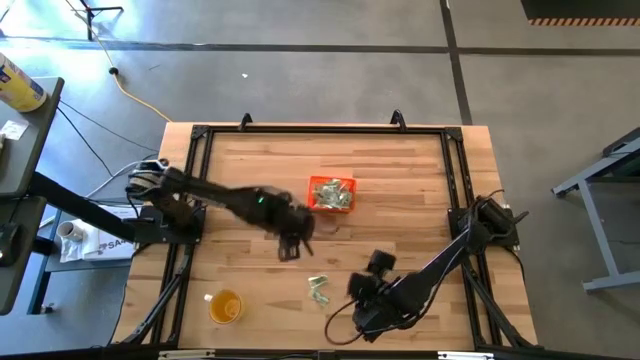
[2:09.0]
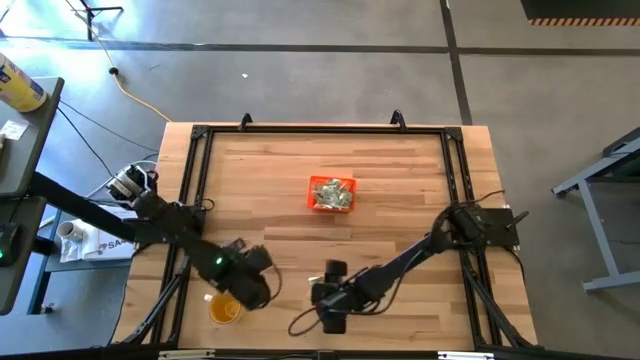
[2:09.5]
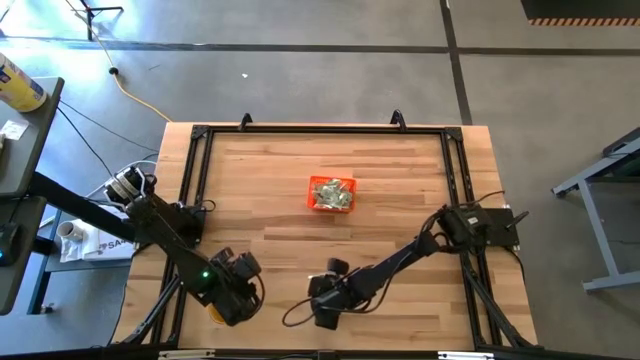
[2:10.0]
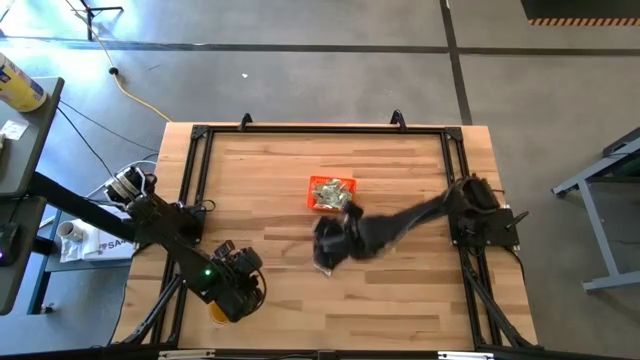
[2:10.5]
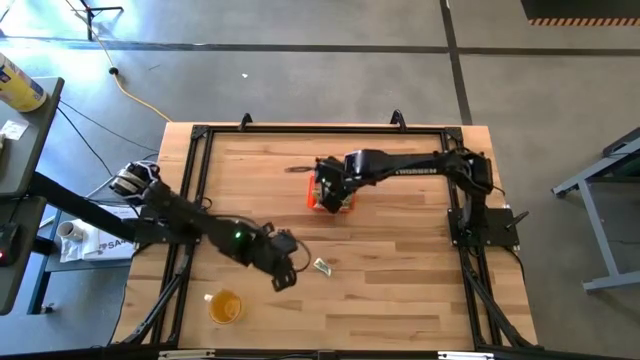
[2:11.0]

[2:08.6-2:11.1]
Task: Pick and place Stevia / Truvia into bins
Put the bottom stevia packet into the basket

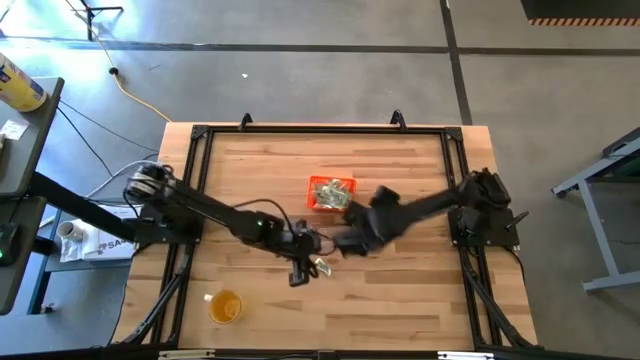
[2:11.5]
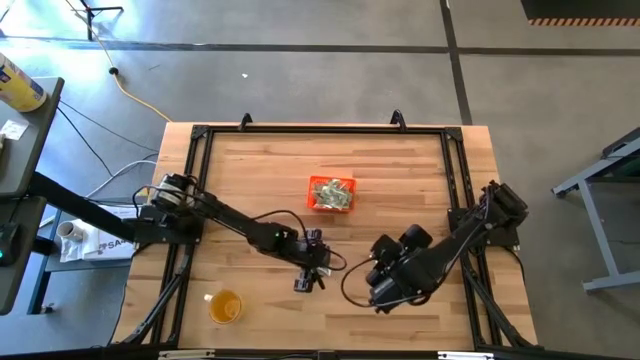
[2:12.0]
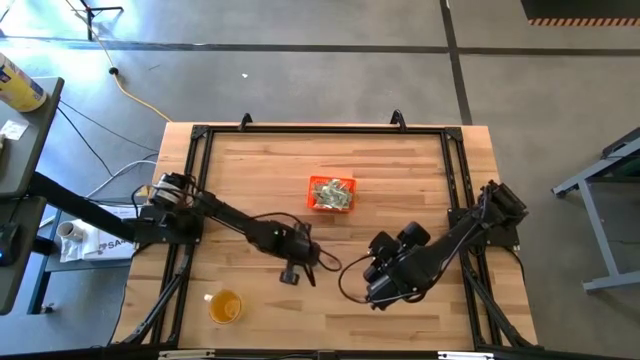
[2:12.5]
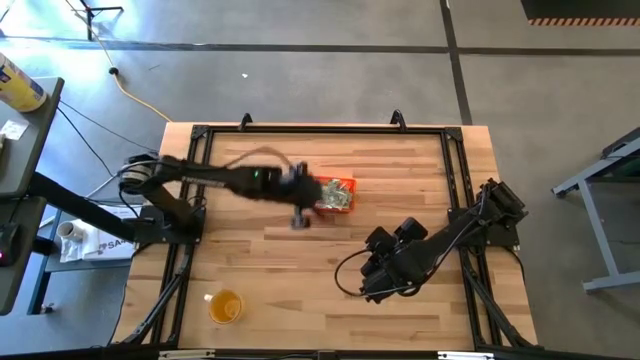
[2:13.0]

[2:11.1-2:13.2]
Put the stevia packet into the basket

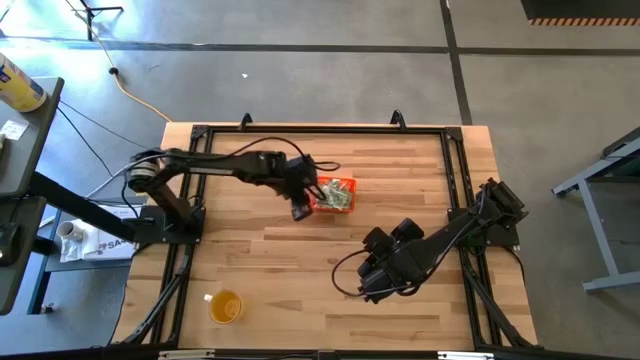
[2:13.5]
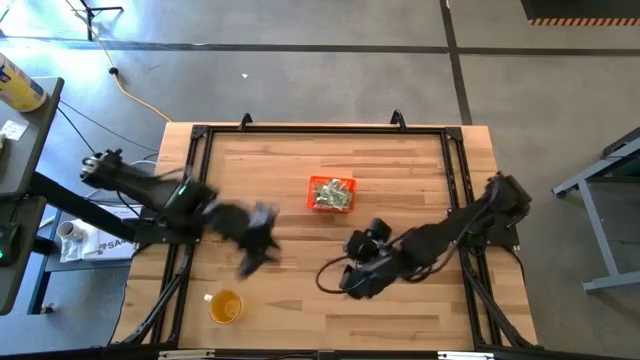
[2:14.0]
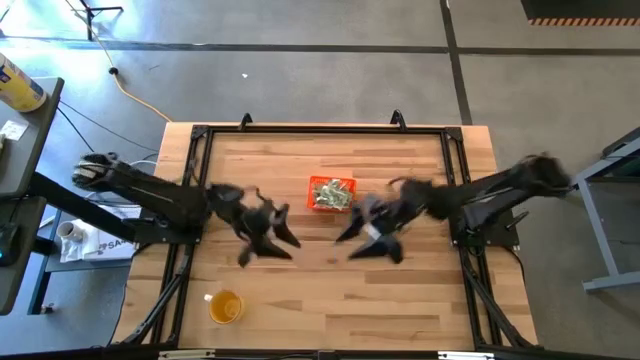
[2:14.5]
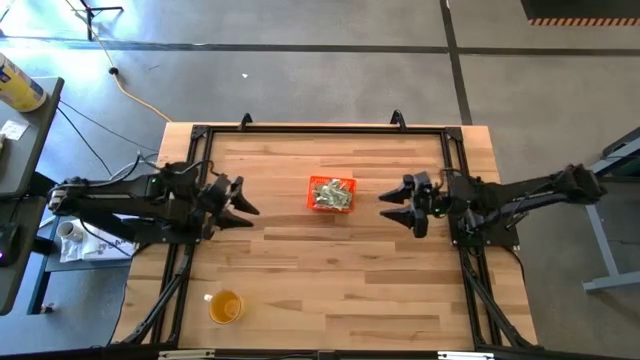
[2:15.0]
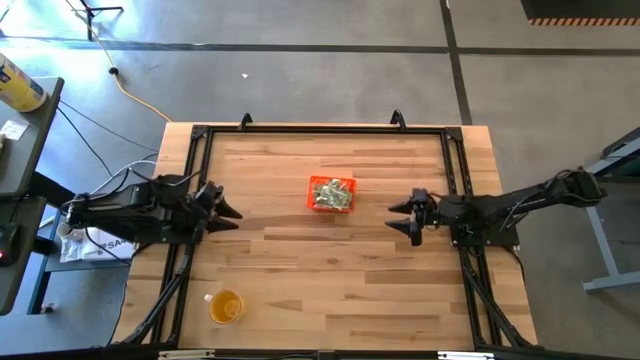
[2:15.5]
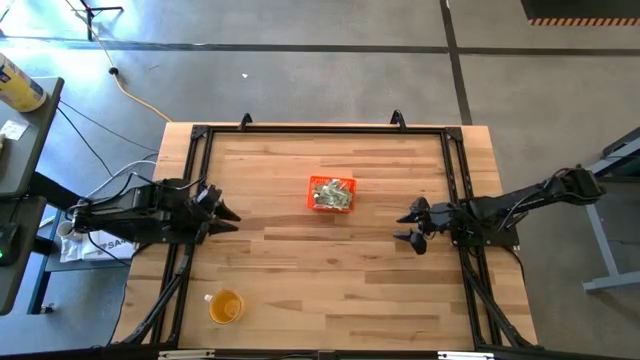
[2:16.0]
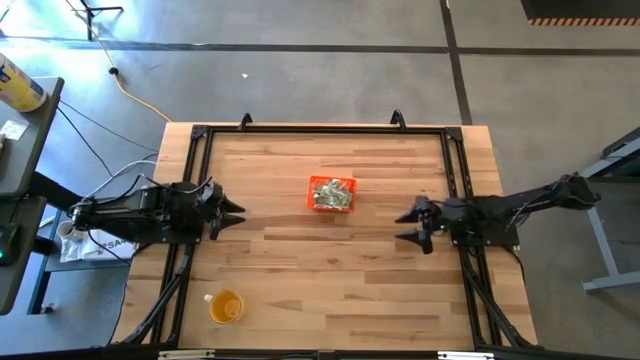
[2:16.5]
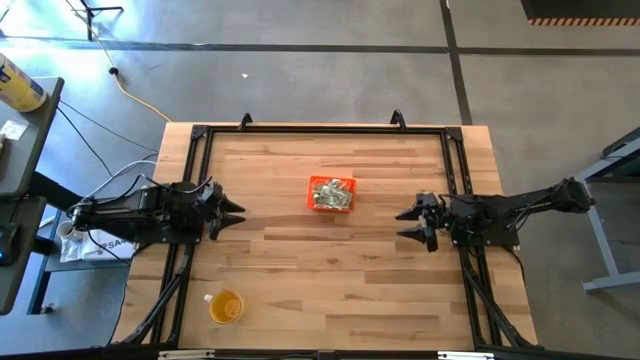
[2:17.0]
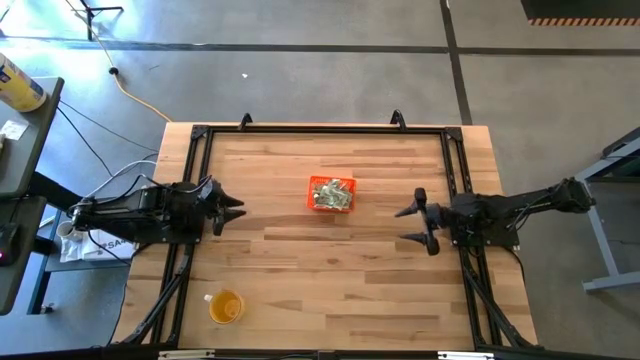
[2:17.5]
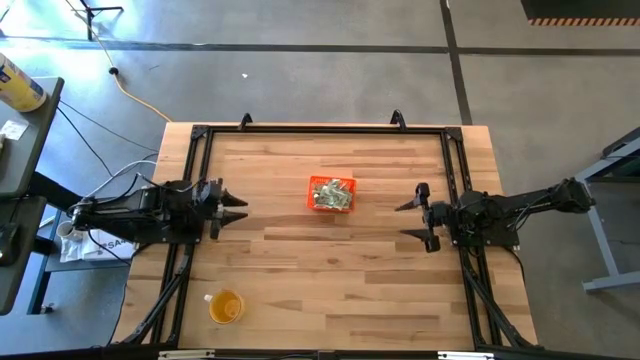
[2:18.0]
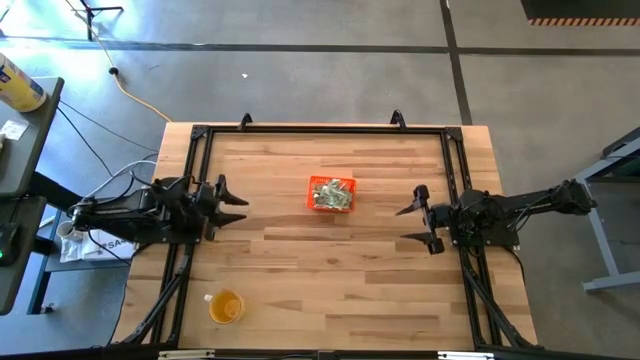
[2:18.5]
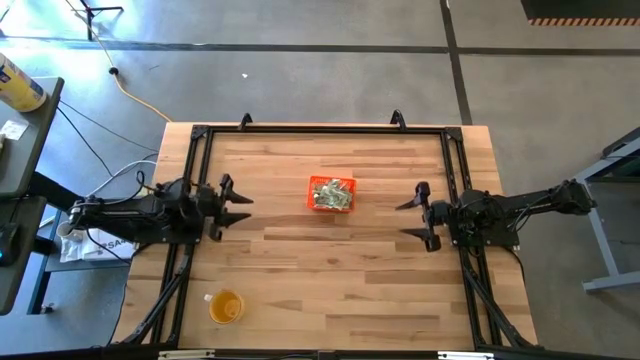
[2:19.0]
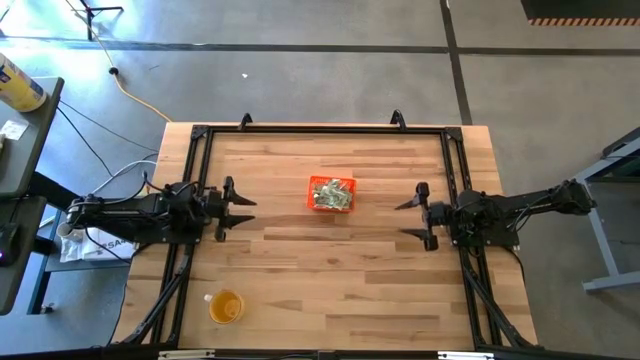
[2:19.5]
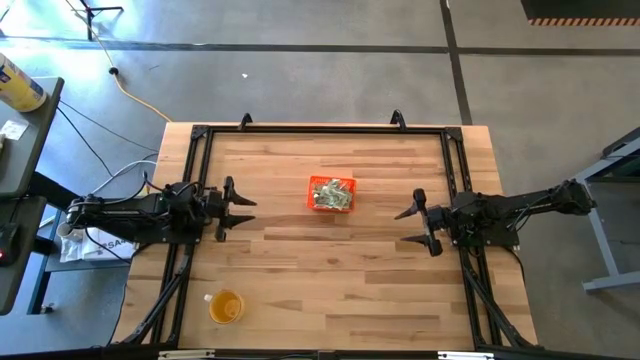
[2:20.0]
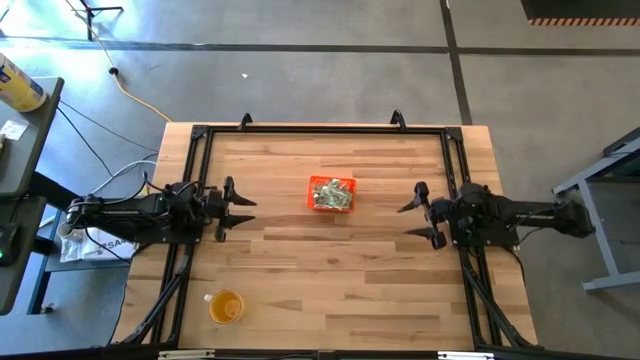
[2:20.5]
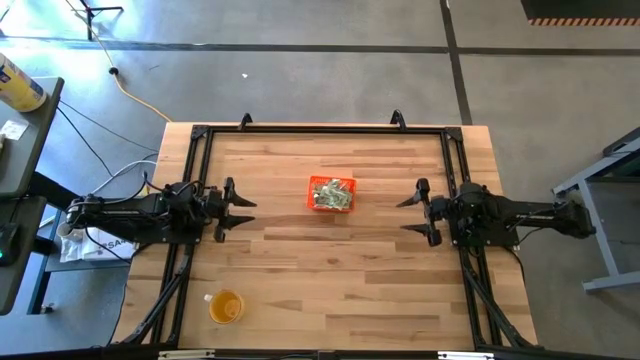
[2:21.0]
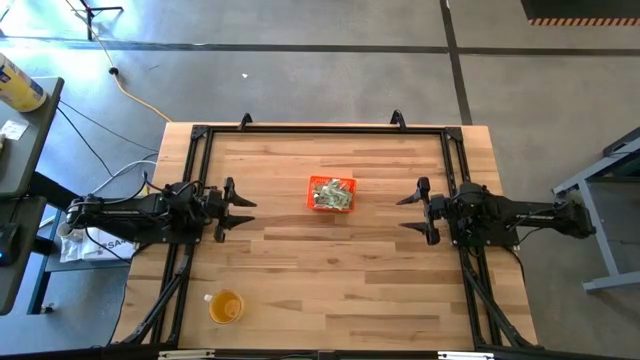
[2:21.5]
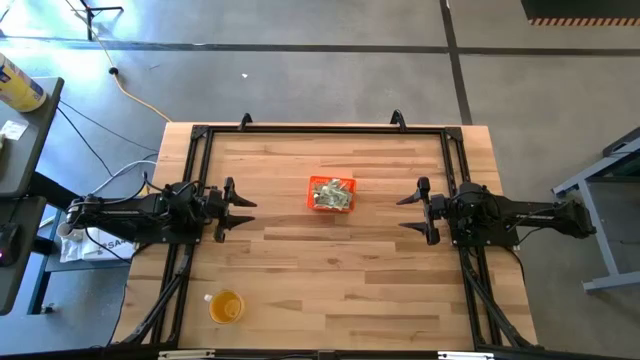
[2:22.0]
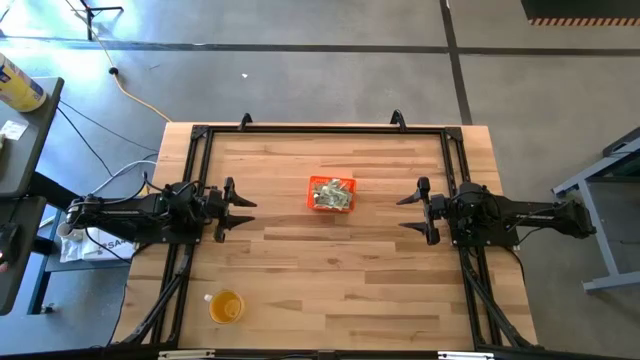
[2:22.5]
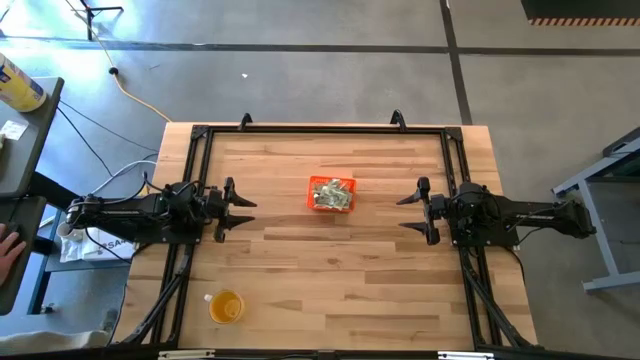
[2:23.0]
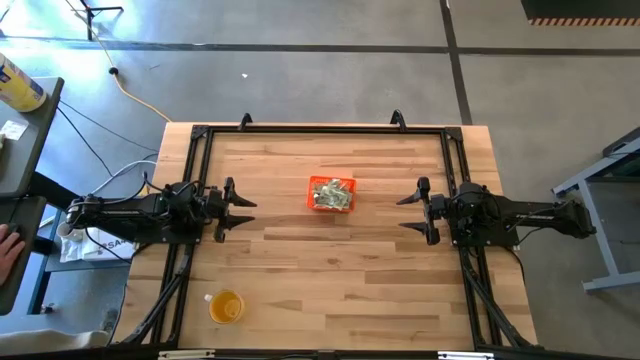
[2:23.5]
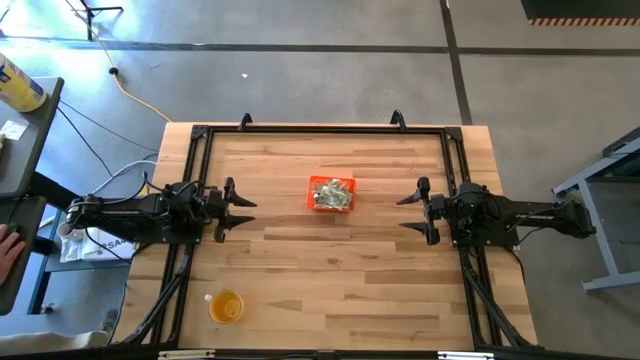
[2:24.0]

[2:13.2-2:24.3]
Return to Home Position

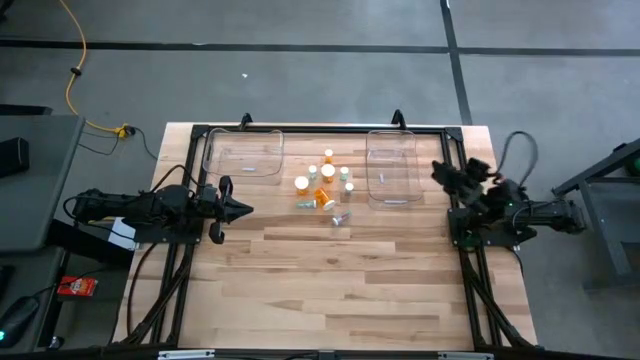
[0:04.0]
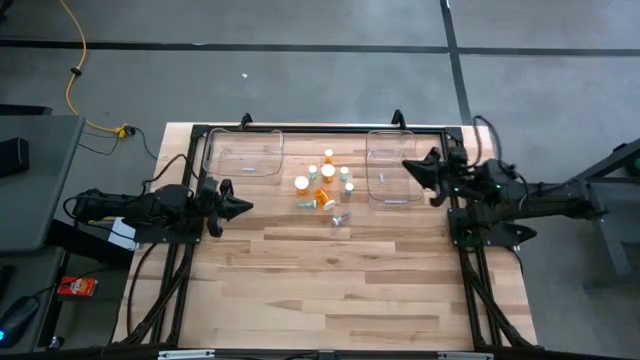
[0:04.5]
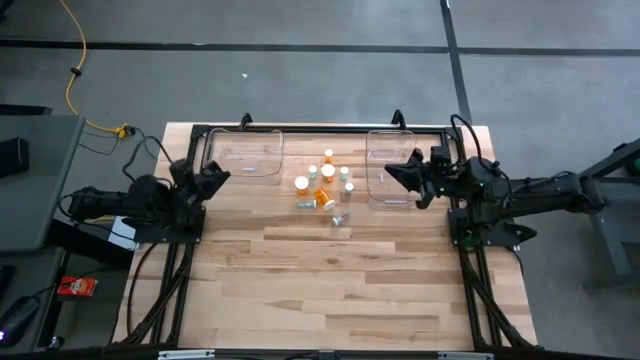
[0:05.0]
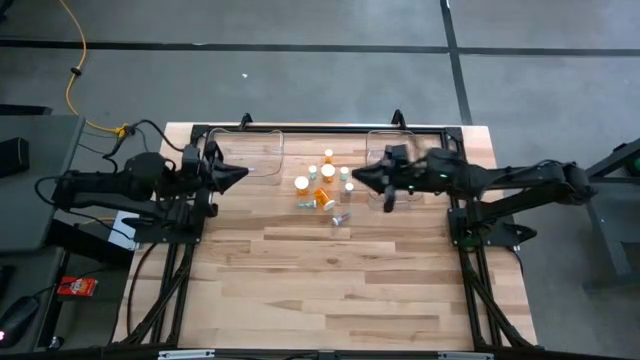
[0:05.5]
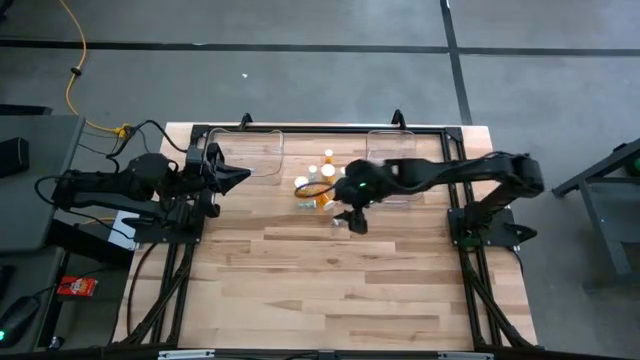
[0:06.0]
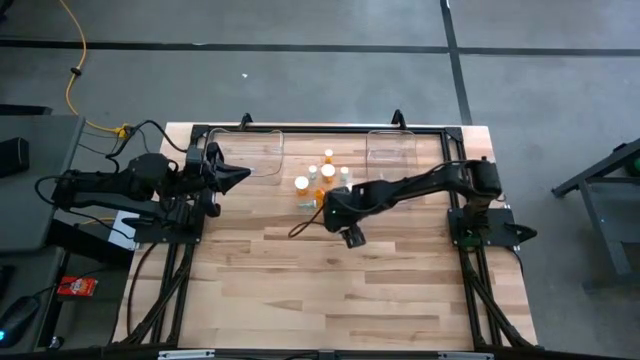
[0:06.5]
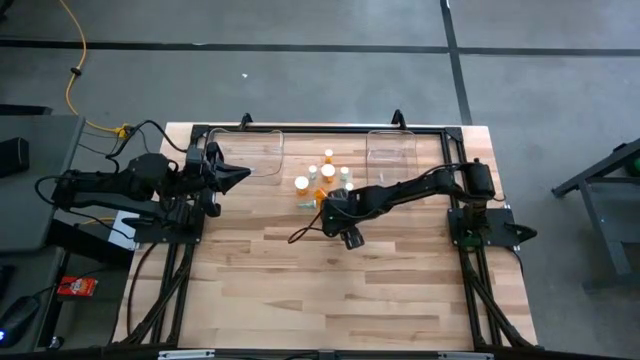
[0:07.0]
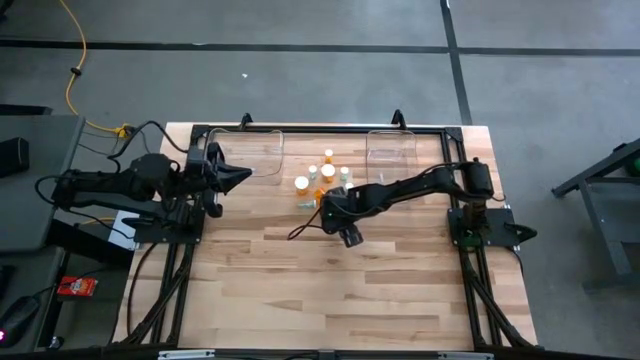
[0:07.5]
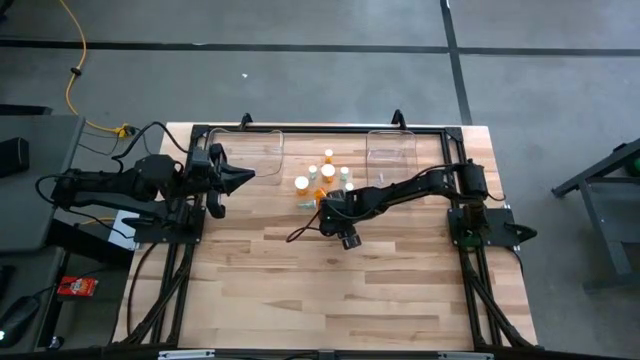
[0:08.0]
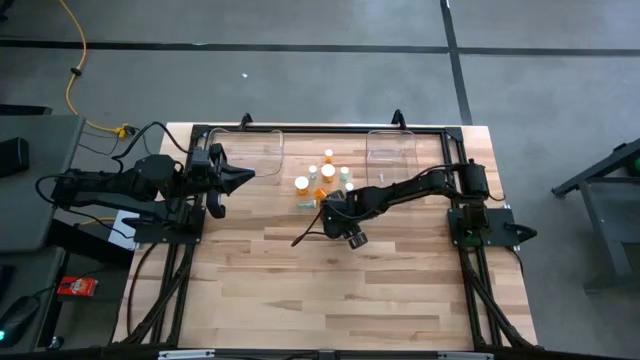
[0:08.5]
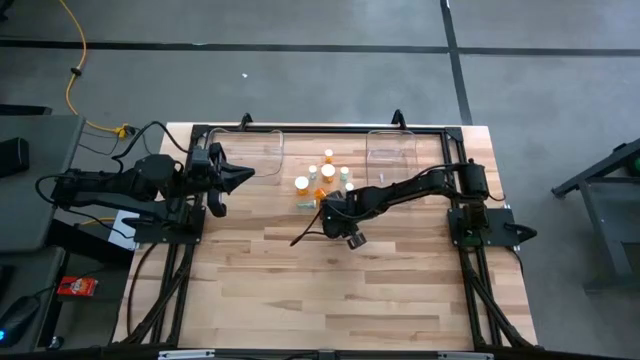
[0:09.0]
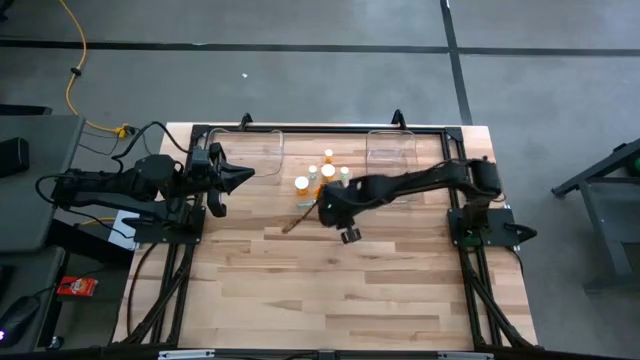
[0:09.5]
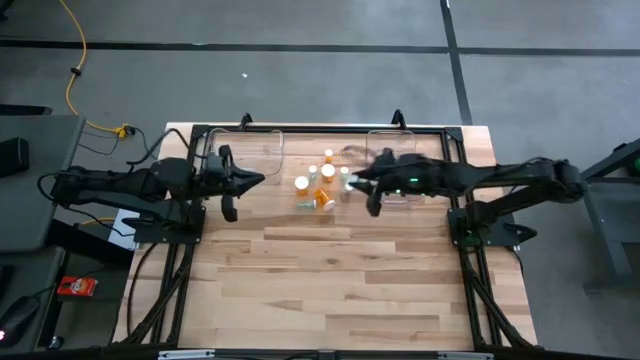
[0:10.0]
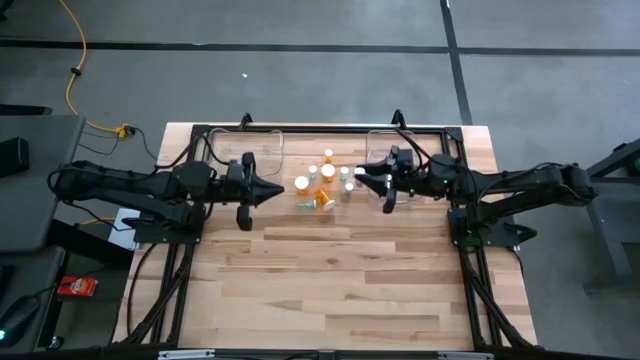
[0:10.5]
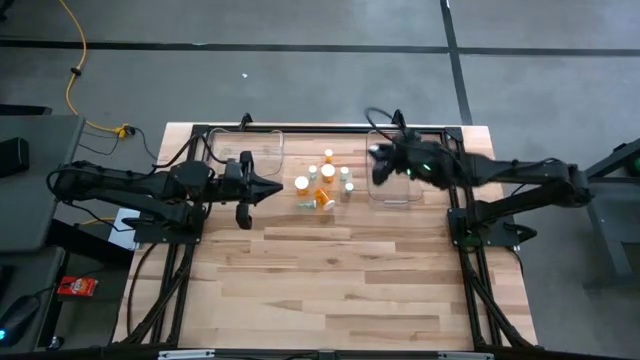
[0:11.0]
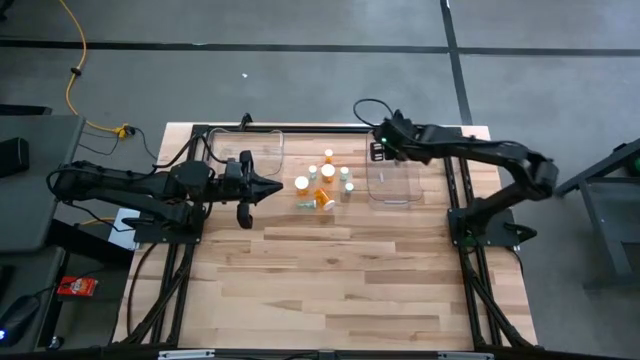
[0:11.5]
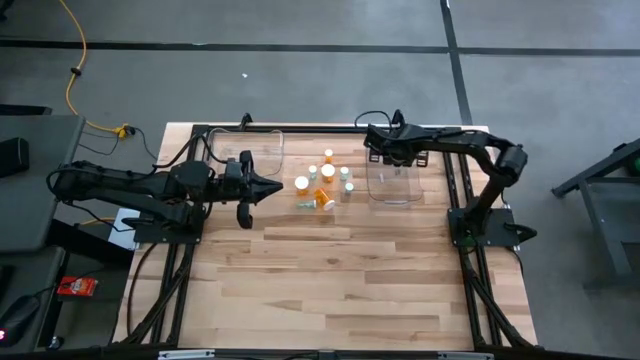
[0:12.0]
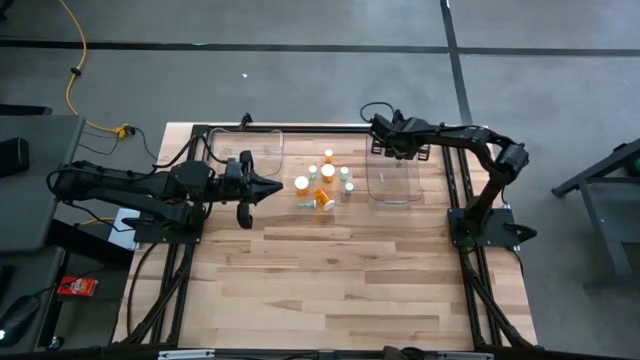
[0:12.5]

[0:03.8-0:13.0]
Task: Pick and place medicine bottles into bin by pill shape (circle, oval)
Put the blue capsule bottle into the right transparent bin
